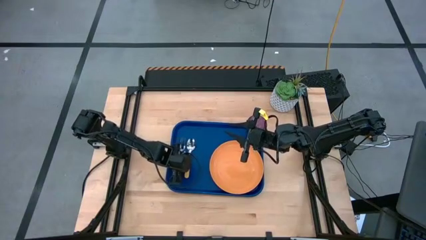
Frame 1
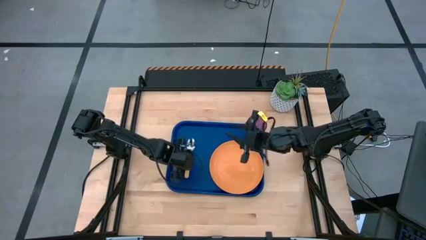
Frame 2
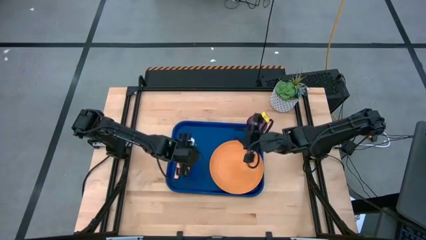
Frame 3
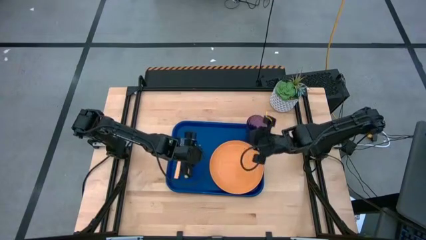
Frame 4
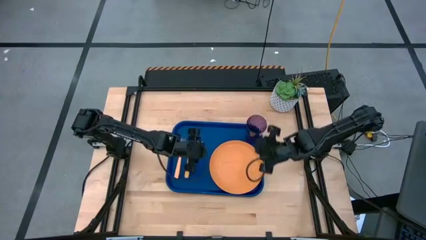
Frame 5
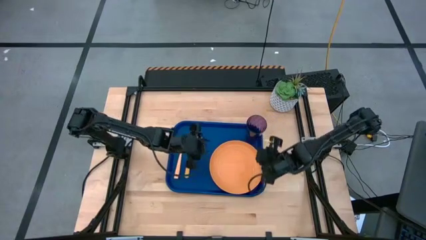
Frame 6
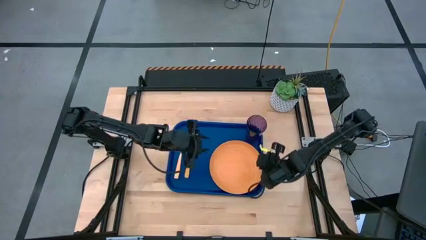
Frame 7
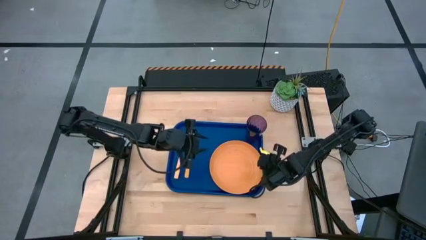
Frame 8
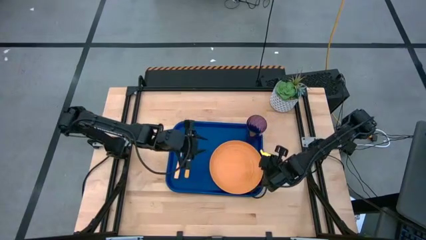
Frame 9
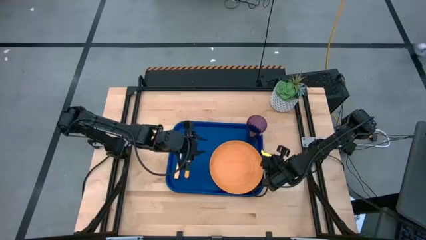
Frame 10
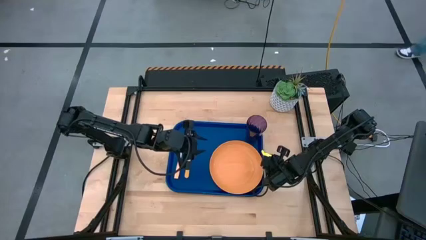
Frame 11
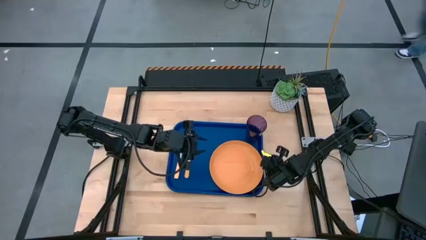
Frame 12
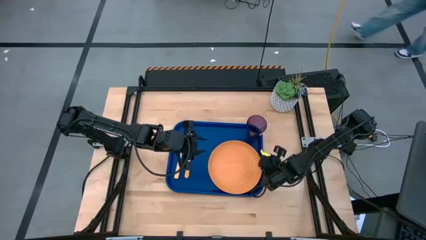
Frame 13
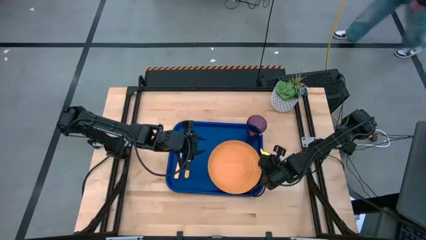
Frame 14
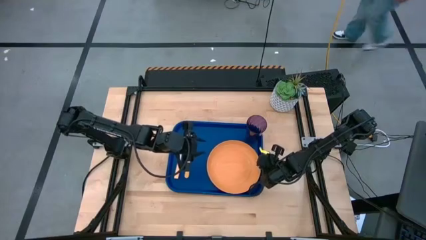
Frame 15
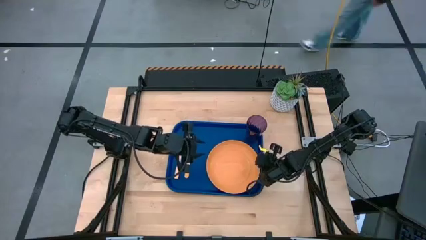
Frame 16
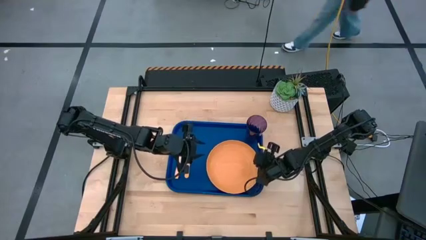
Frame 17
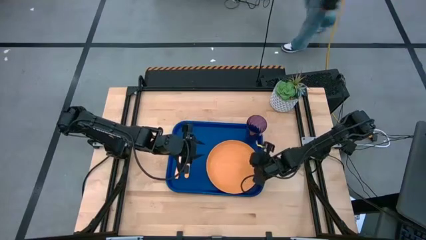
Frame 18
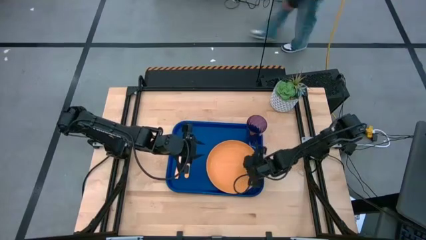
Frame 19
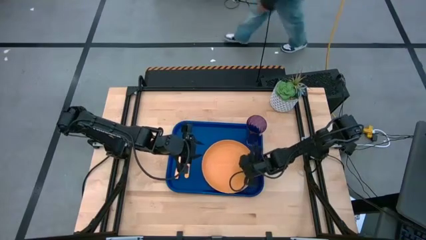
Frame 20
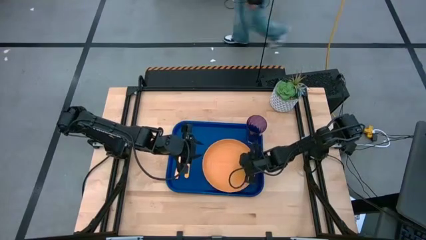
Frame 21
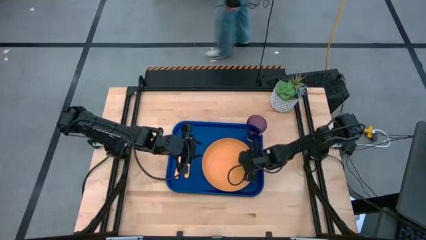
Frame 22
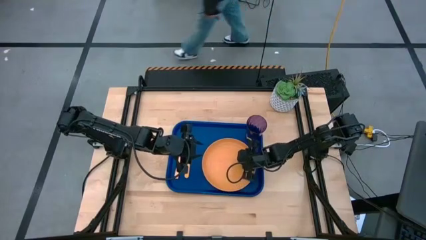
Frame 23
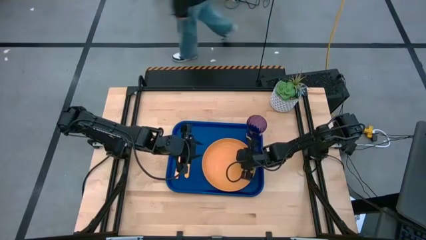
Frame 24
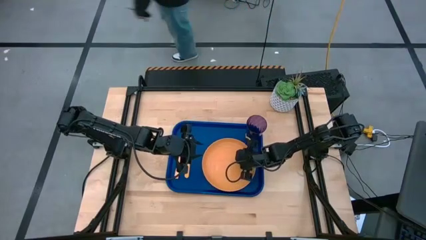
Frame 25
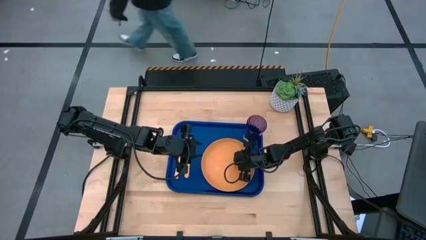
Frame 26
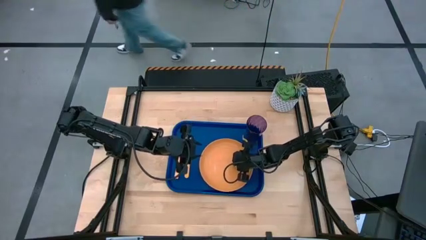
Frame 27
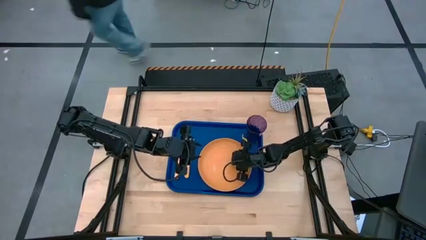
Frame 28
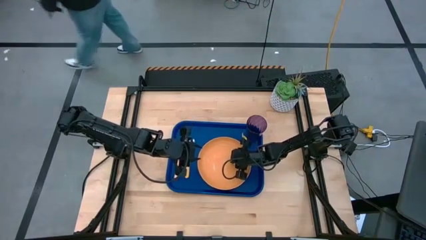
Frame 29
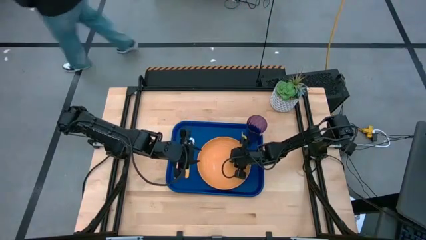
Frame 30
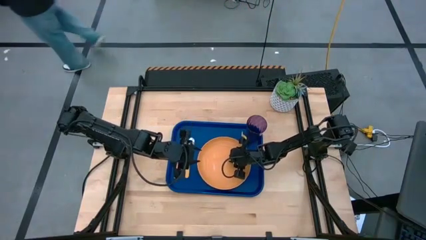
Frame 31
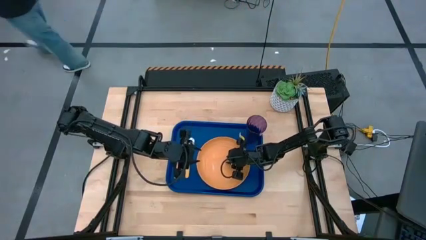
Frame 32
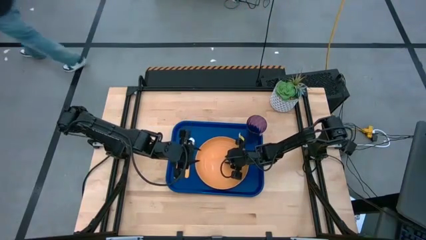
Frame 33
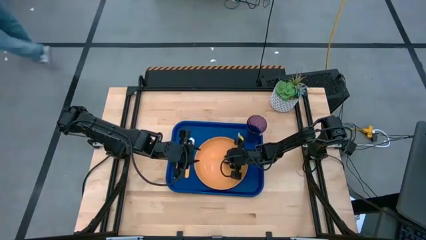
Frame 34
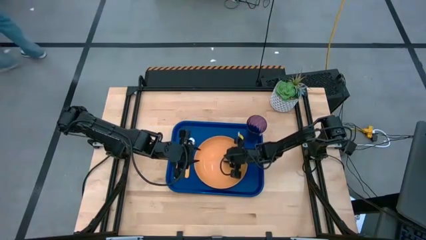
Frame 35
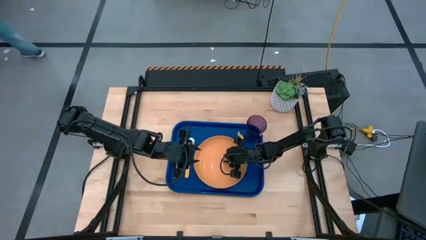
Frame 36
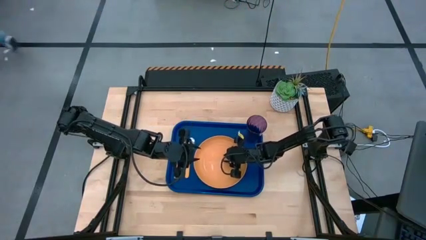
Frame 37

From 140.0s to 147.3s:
Task: Pick and place plate/cup/fork/spoon on tray
Adjust the orange plate on the blue serving tray

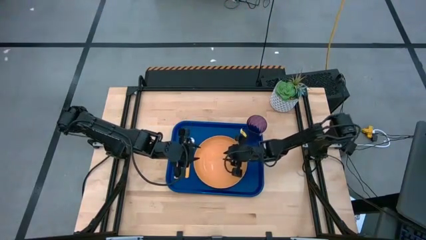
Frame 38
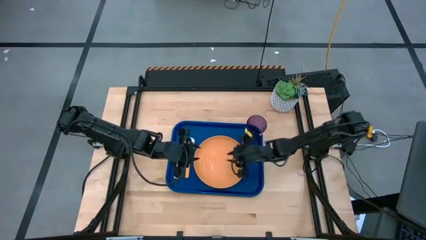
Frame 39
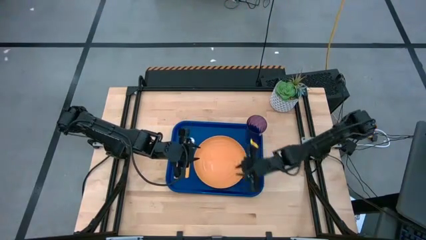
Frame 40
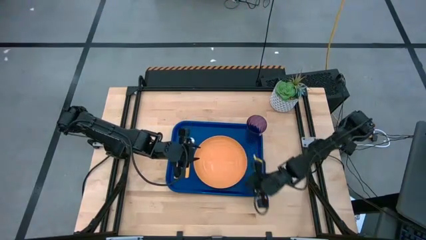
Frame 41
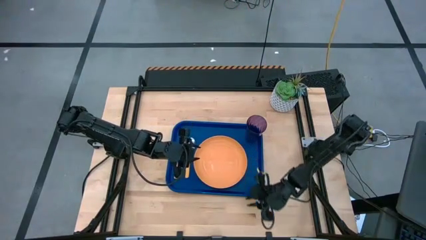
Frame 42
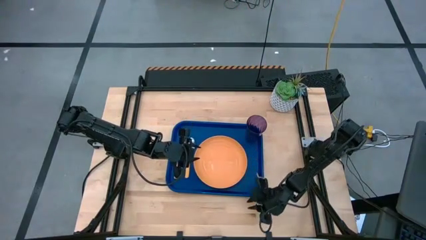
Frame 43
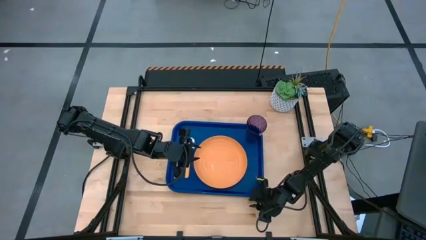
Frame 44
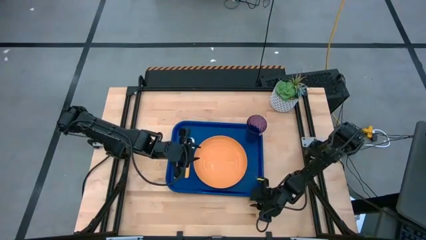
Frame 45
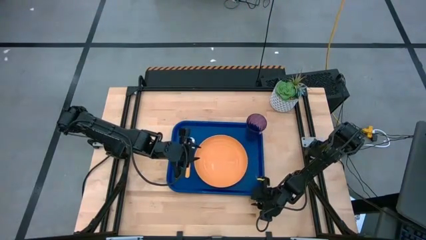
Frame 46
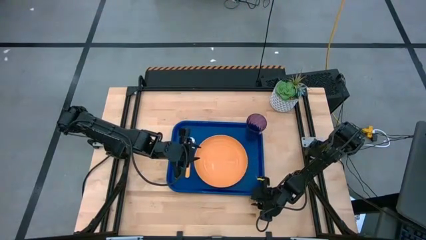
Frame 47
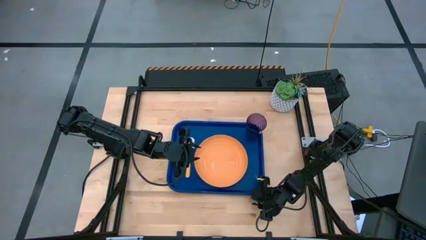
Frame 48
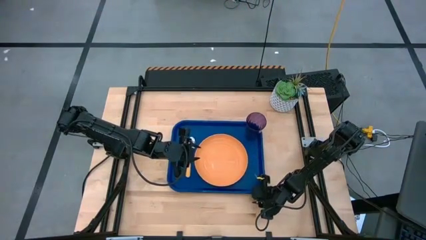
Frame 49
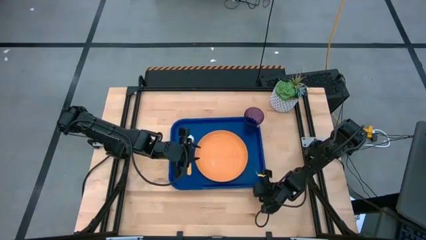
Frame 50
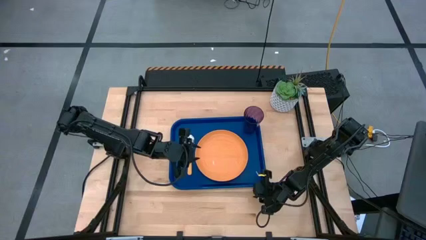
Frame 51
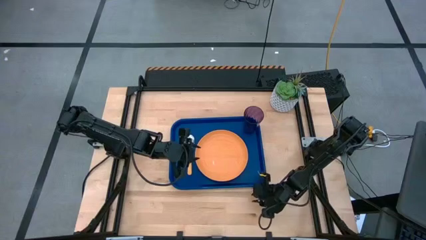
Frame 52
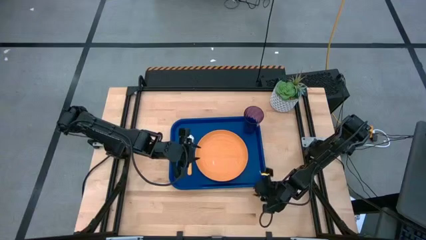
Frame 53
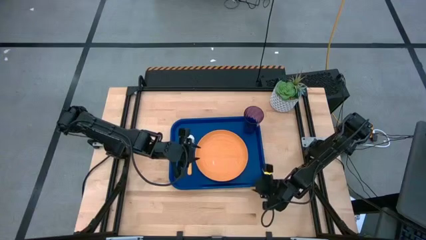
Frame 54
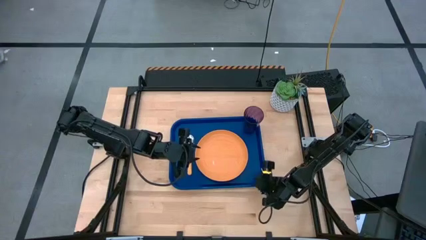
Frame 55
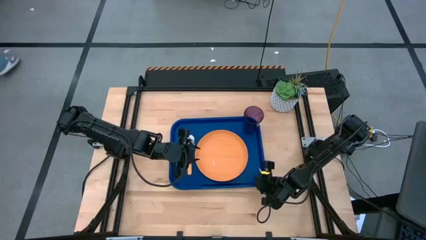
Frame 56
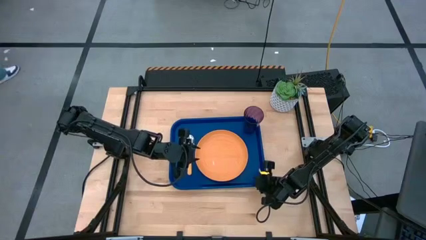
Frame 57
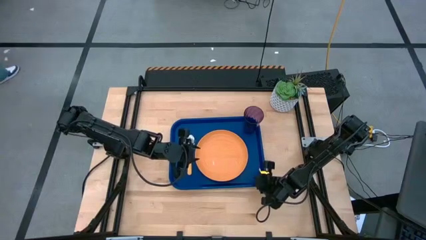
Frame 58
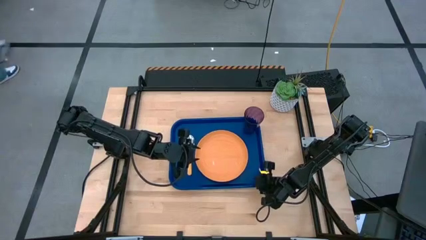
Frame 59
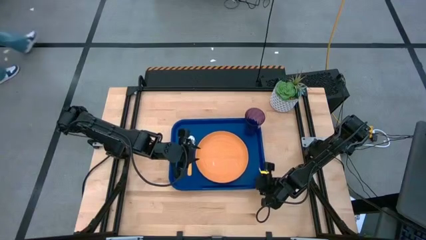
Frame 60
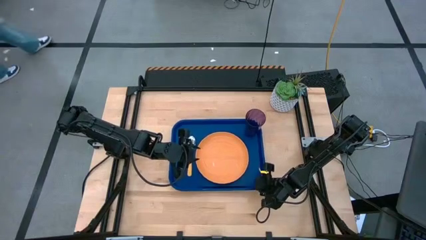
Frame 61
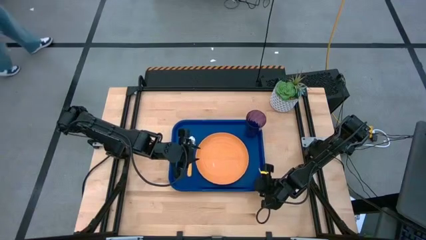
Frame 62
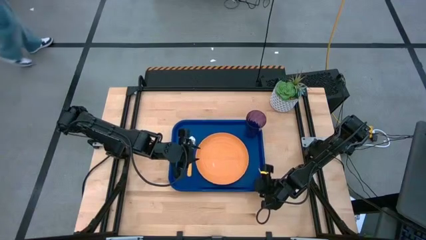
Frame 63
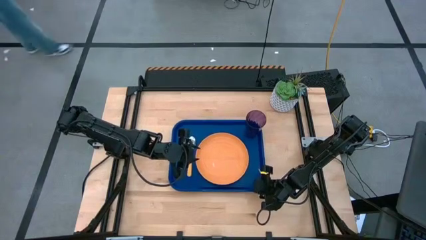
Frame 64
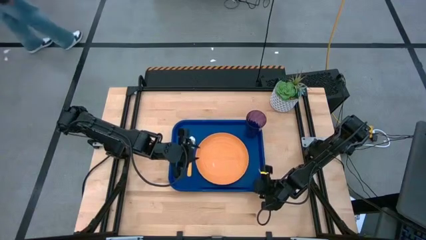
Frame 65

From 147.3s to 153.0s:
Adjust the blue serving tray

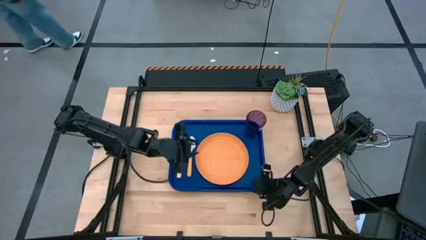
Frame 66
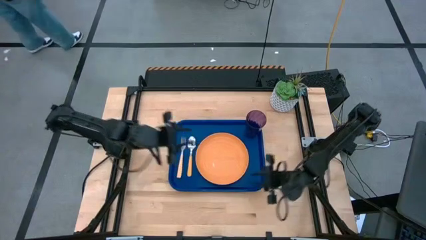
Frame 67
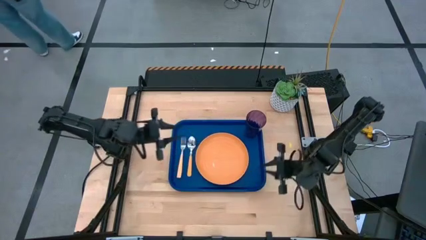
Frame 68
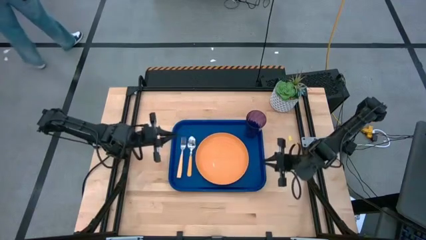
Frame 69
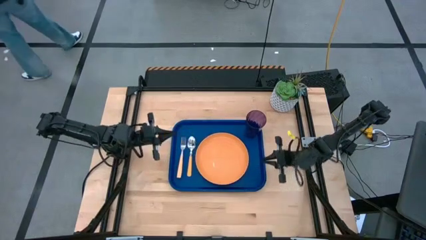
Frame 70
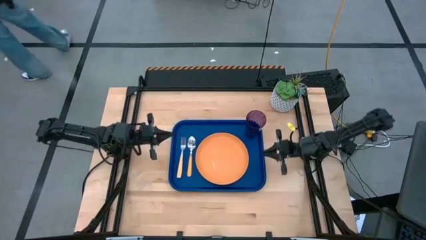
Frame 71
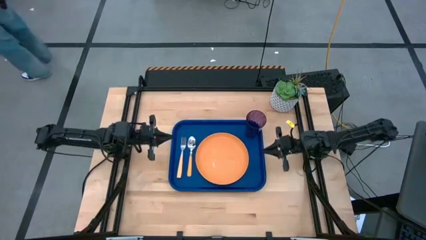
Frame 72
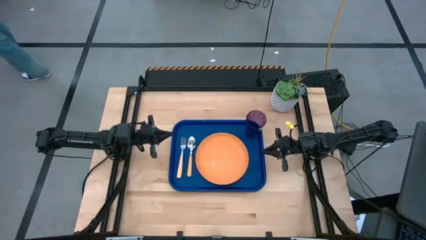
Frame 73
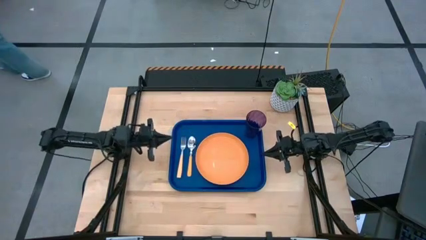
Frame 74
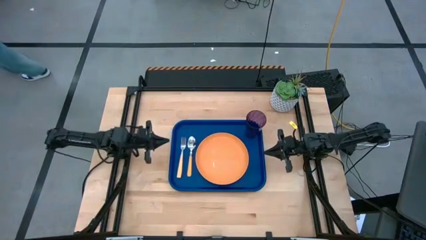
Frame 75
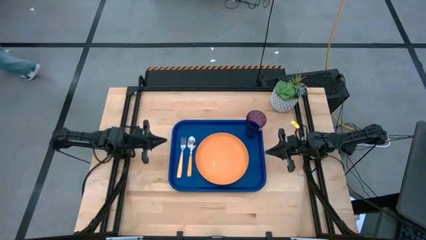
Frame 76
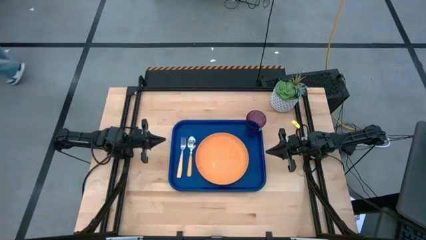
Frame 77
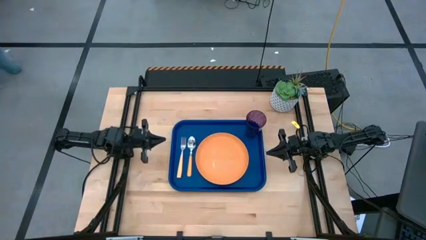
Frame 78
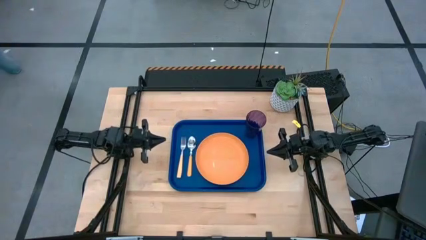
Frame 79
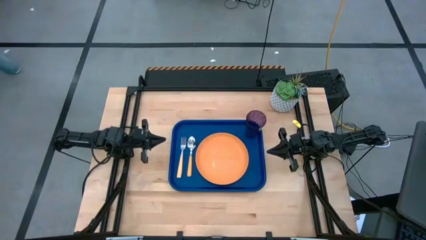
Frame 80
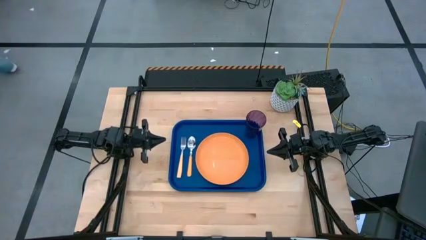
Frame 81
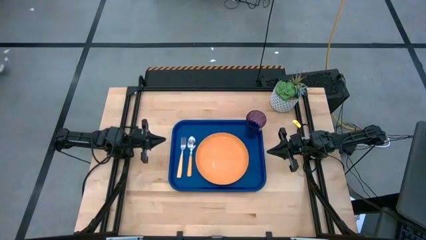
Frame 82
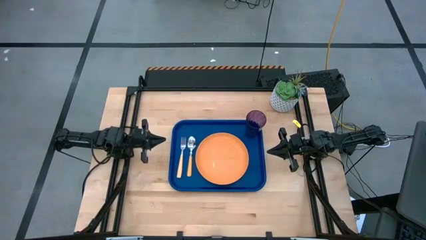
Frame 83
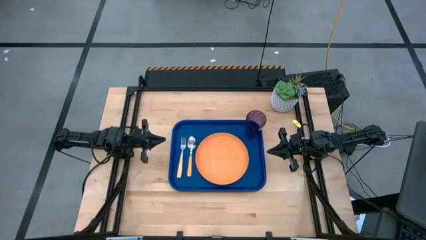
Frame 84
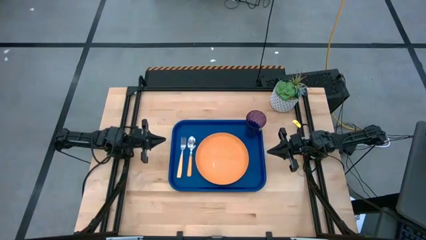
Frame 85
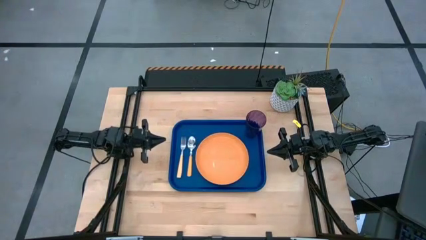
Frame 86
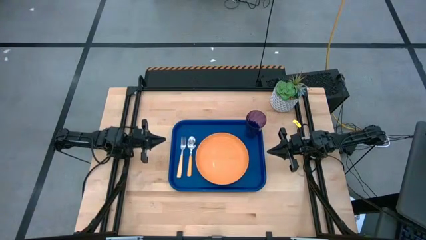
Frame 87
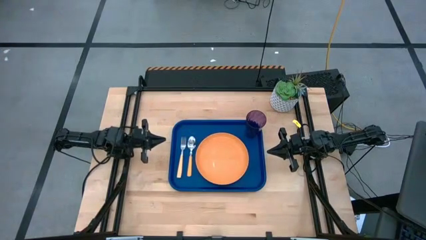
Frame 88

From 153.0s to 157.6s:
Return to Home Position
